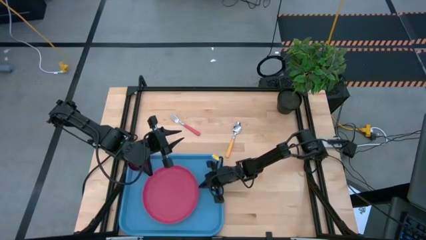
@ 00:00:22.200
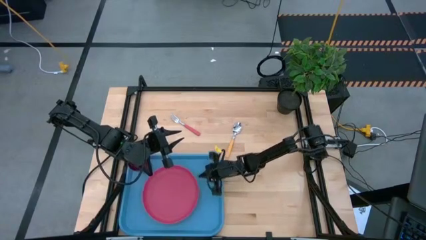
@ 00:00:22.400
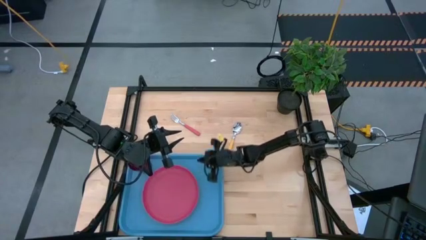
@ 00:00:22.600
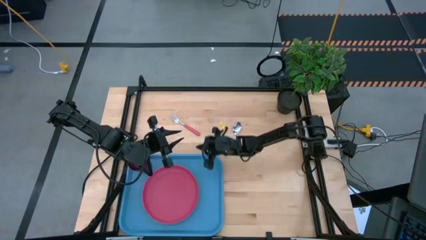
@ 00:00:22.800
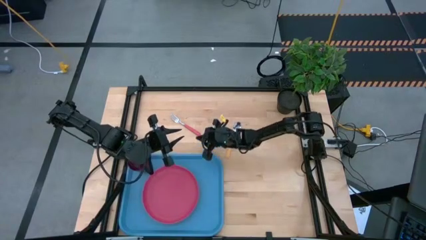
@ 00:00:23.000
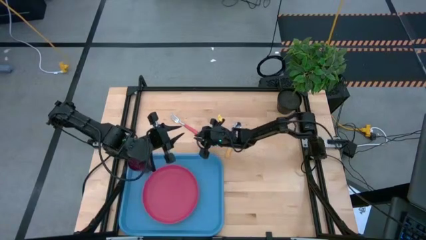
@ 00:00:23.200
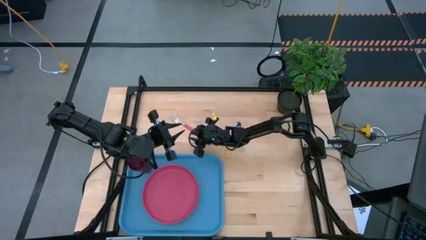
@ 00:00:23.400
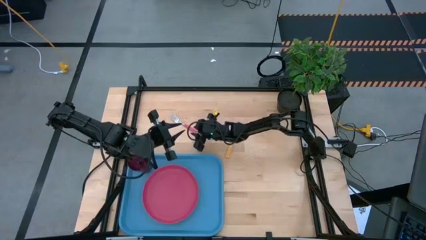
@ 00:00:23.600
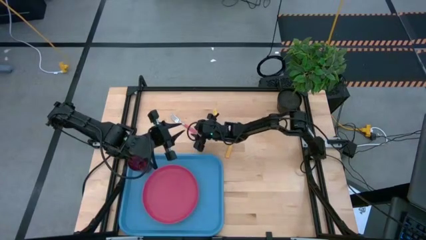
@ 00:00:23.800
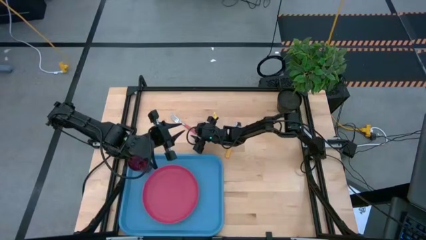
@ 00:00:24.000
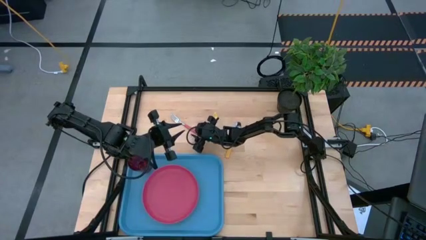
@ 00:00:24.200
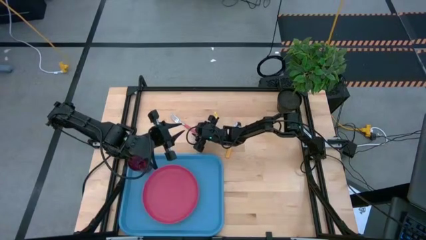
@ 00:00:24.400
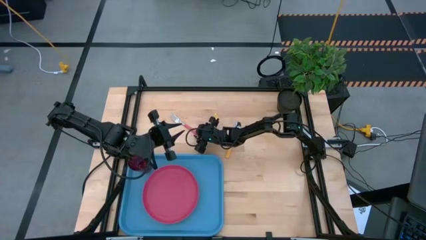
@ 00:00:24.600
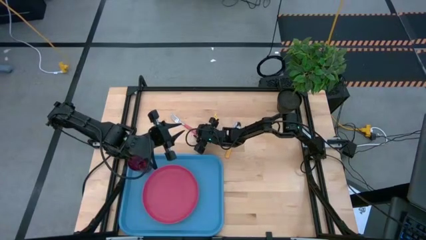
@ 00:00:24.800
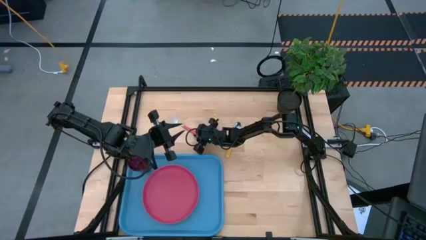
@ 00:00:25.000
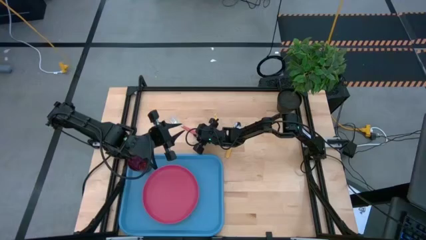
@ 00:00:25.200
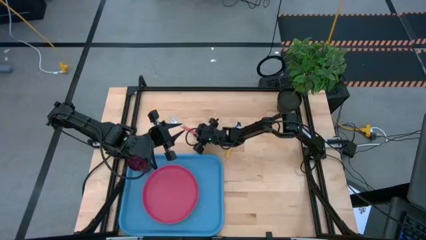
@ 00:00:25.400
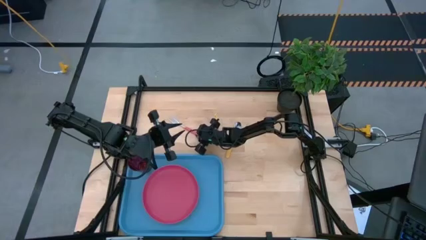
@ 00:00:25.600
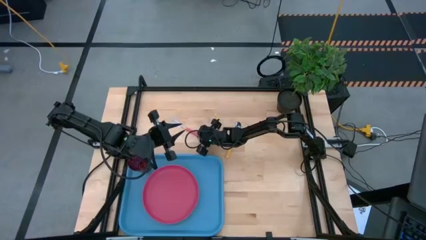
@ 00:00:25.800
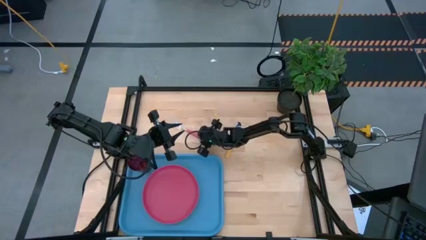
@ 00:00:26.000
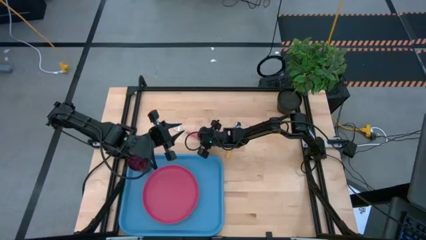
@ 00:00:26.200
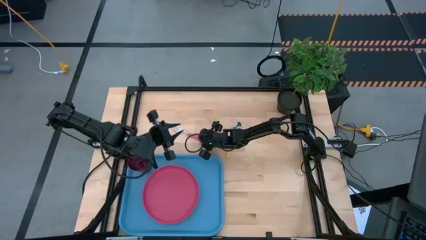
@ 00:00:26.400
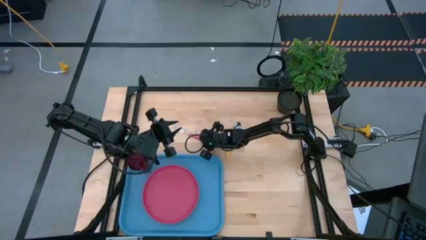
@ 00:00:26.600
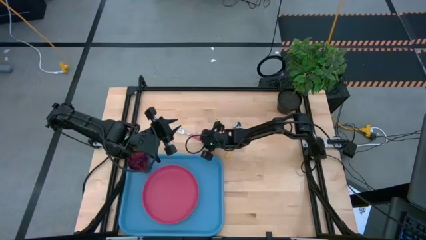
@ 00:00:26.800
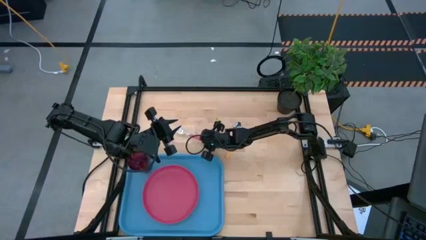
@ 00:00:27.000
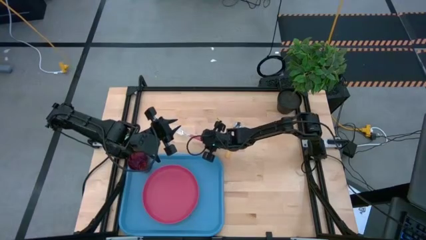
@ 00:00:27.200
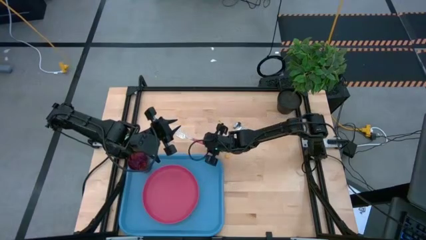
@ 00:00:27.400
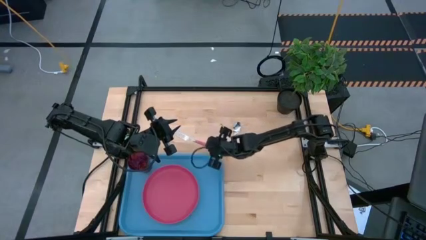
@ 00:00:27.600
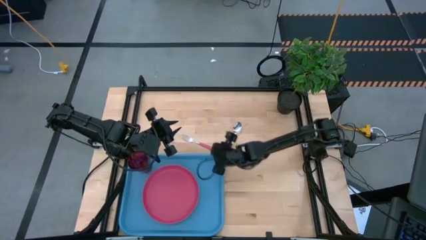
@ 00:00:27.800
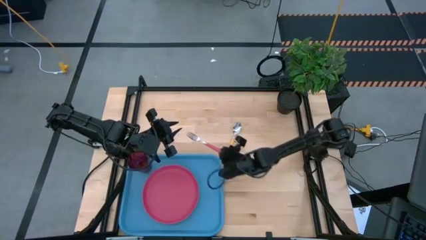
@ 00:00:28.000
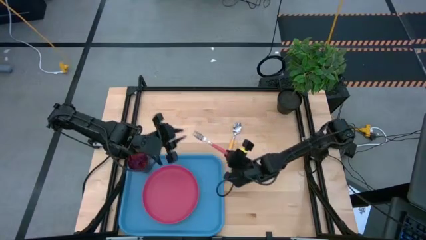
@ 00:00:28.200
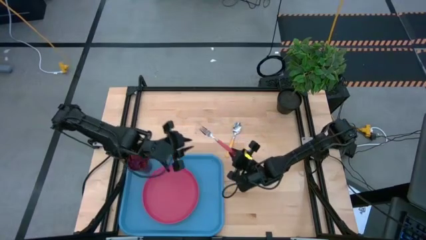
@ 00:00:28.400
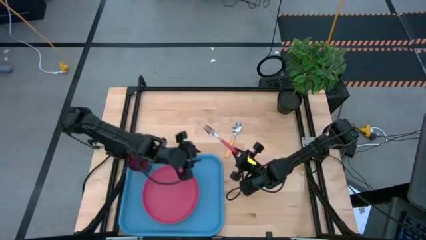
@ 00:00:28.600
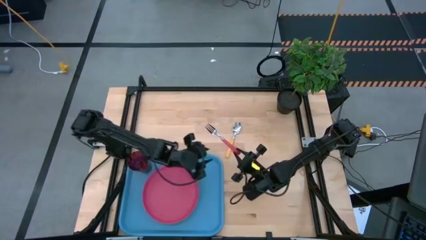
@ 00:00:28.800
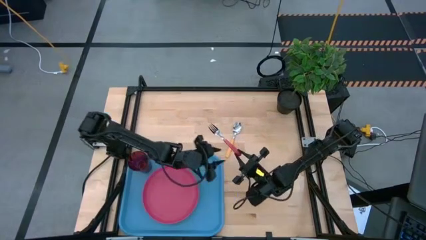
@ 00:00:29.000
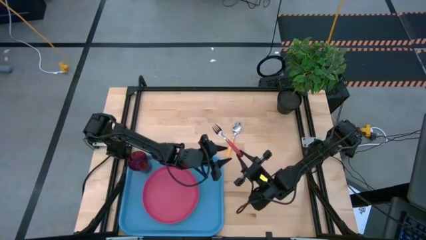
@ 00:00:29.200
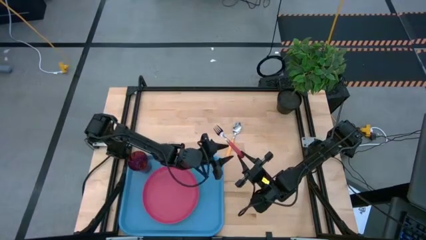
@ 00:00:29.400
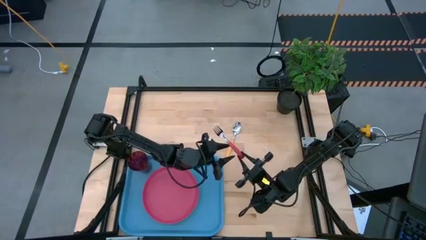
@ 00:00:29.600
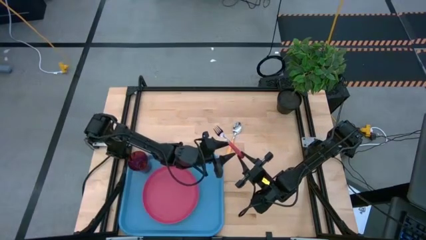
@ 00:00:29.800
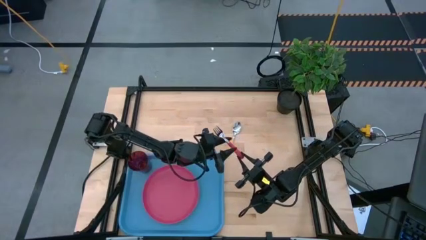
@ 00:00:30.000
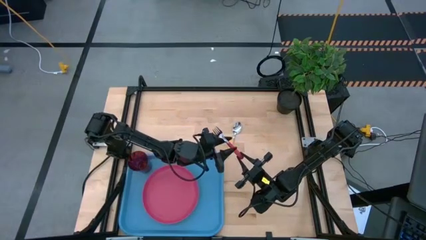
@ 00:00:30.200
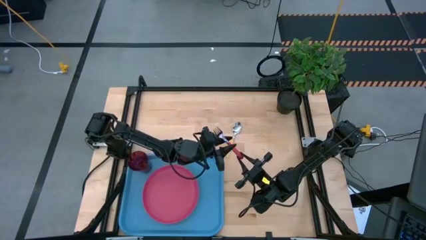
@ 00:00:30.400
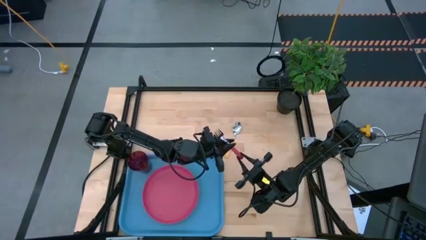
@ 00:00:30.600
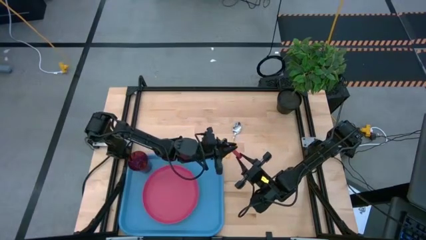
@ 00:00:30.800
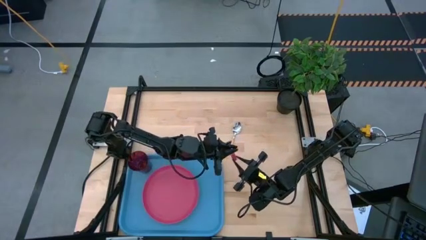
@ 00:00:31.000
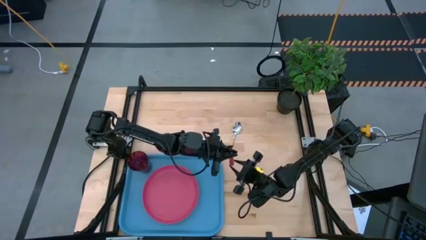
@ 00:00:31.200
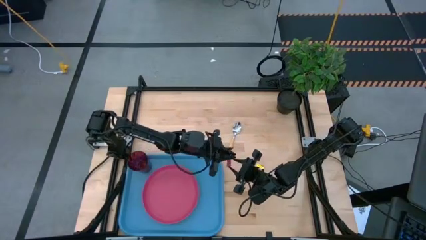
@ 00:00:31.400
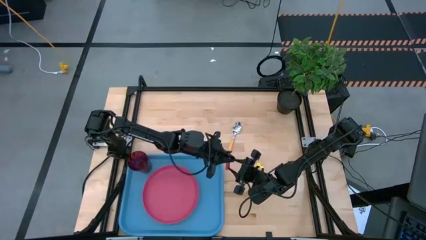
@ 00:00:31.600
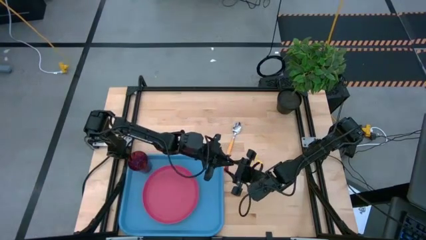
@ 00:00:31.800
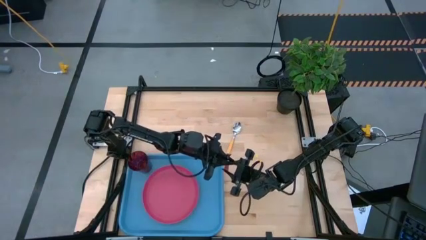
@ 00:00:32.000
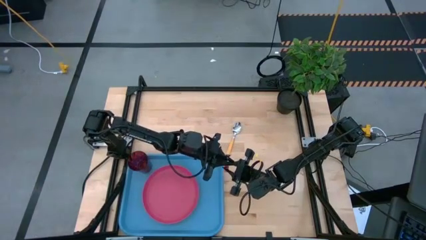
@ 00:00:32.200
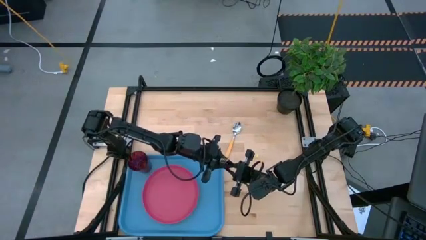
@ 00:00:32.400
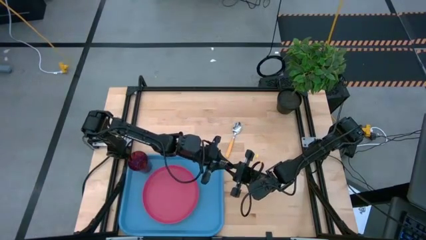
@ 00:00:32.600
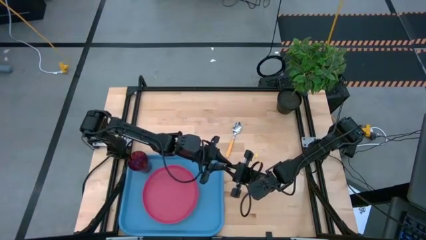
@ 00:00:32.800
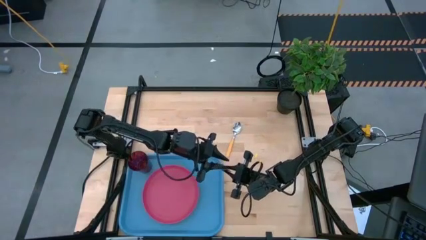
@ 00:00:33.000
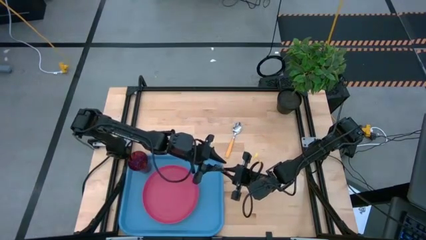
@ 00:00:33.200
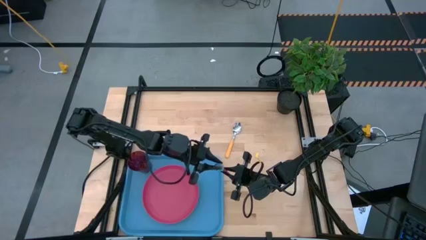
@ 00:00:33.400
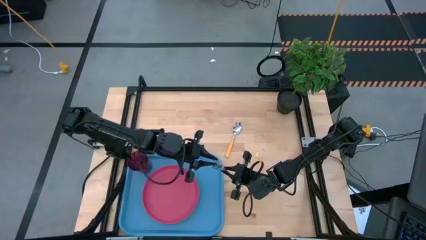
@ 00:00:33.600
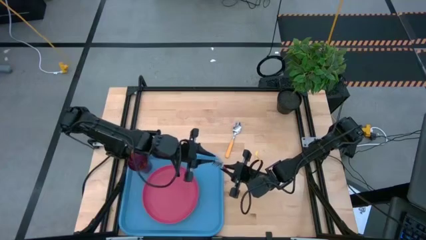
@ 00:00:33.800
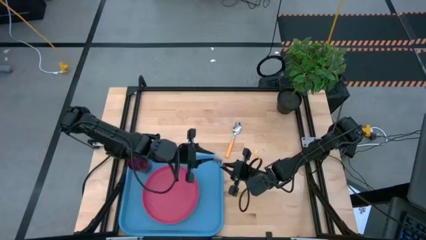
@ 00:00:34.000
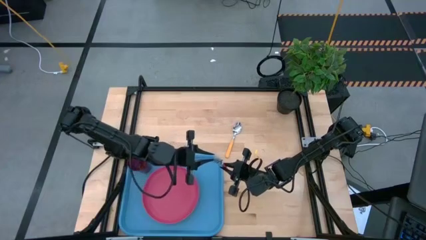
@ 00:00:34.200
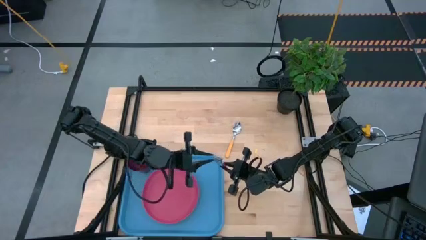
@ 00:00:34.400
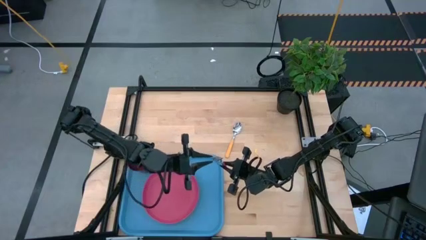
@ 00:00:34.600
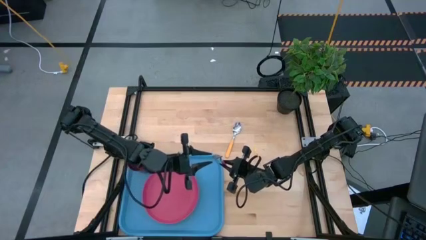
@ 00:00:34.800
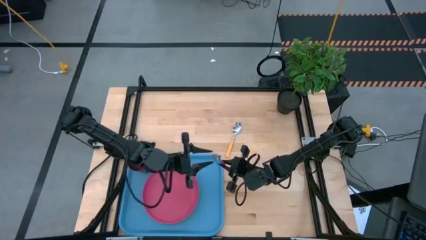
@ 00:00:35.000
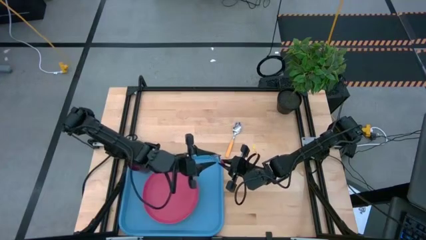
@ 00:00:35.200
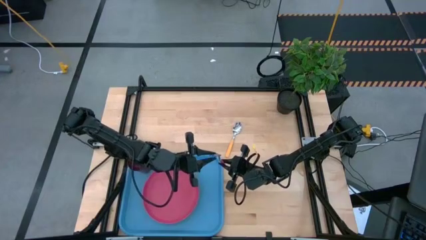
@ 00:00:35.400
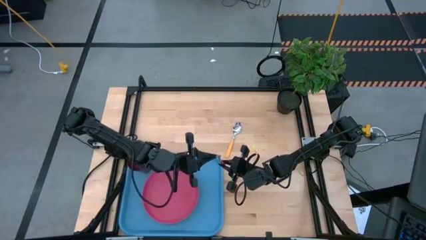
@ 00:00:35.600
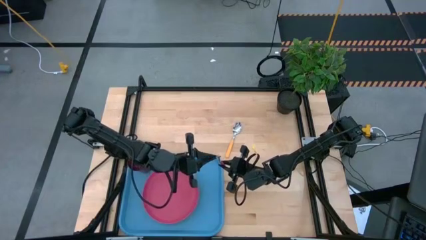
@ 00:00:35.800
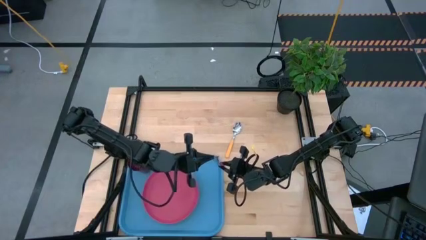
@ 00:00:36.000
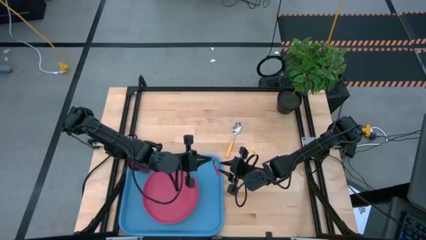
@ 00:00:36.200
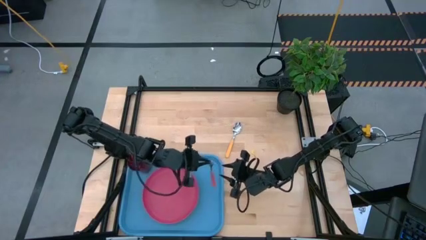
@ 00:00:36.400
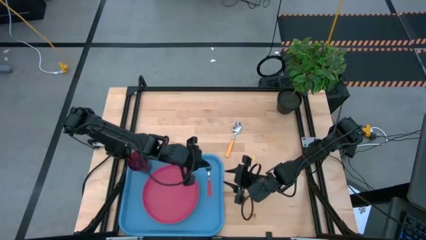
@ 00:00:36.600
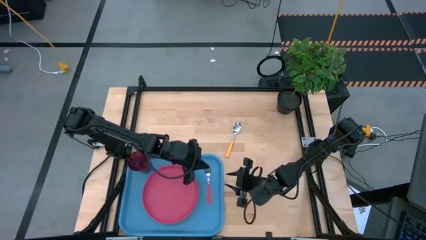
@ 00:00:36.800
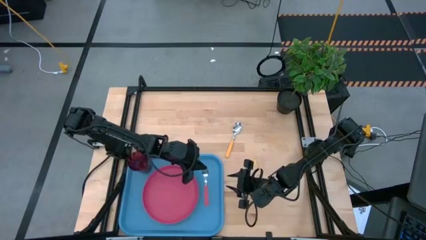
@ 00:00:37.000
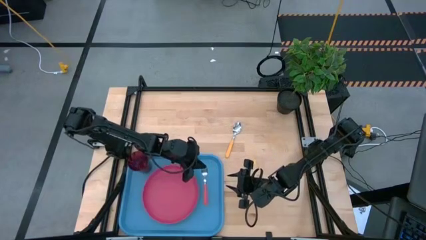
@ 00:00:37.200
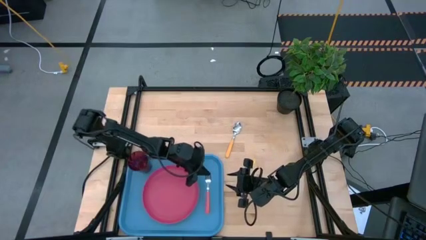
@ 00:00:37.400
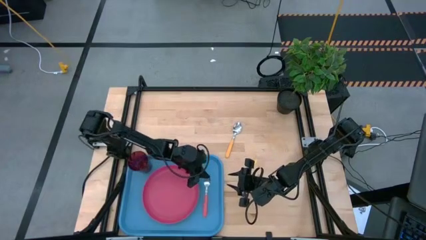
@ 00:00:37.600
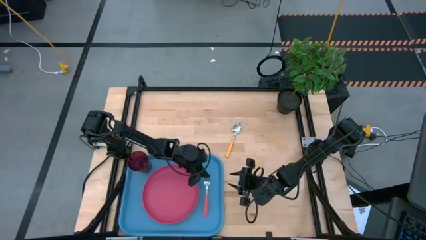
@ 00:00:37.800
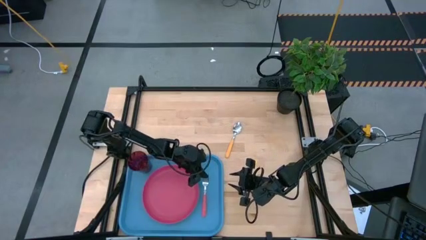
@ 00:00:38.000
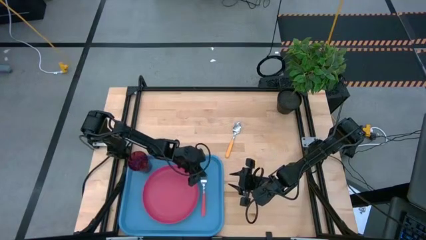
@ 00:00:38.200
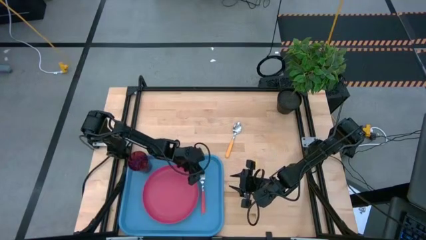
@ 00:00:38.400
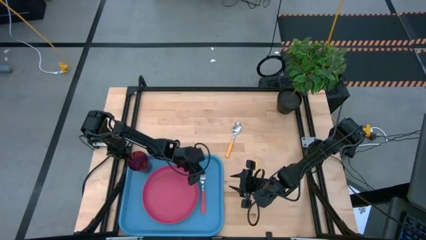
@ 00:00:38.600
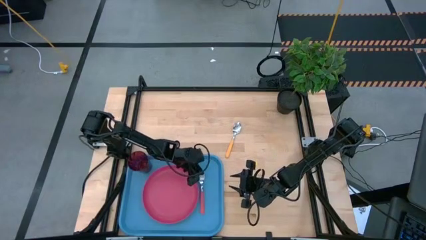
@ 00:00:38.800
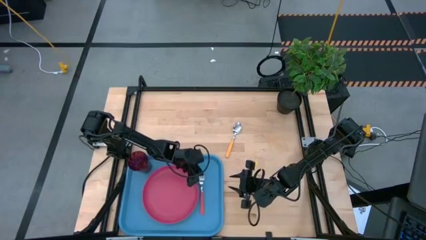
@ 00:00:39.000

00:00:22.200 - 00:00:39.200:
Task: Pick and place plate/cup/fork/spoon on tray
Put the pink fork on the blue serving tray to the right of the pink plate
